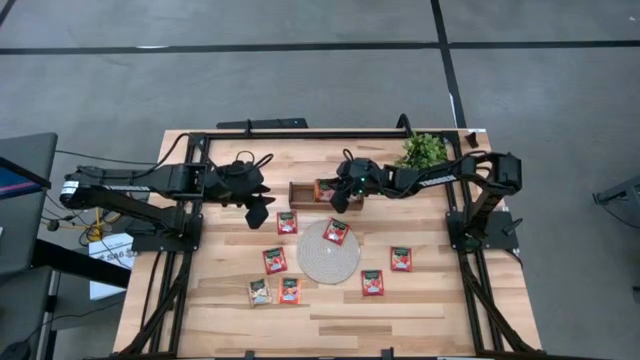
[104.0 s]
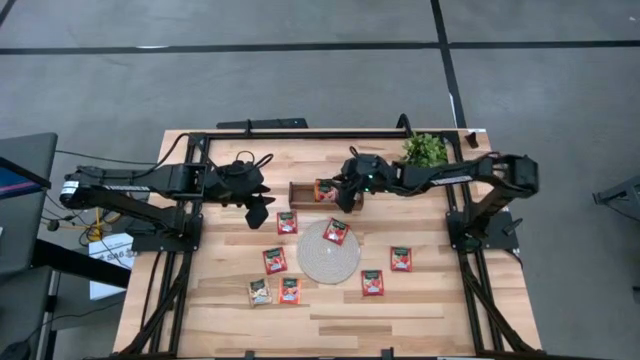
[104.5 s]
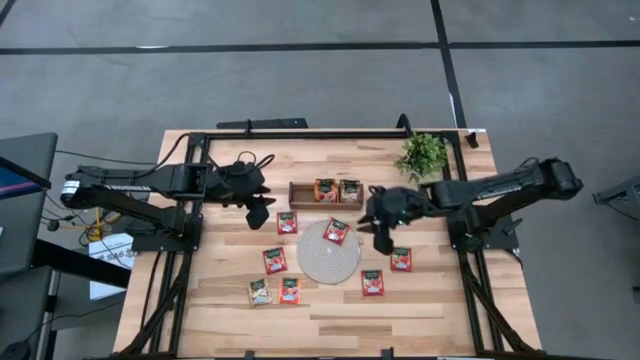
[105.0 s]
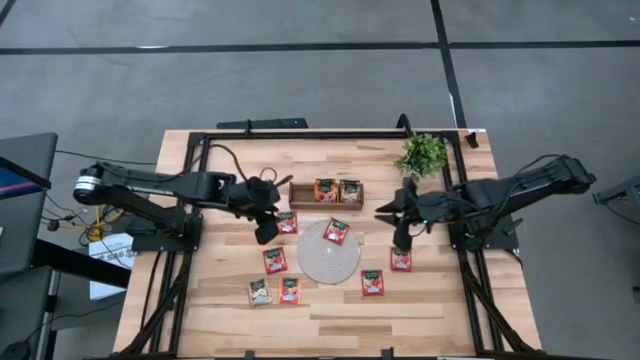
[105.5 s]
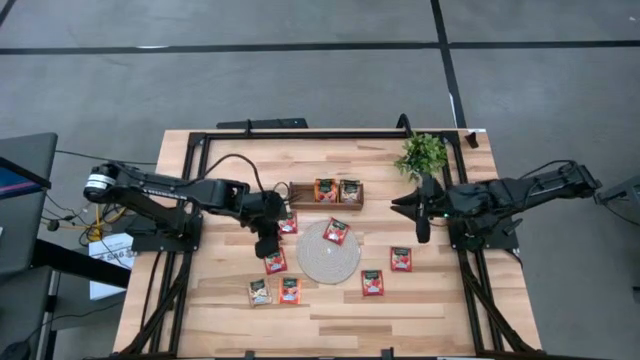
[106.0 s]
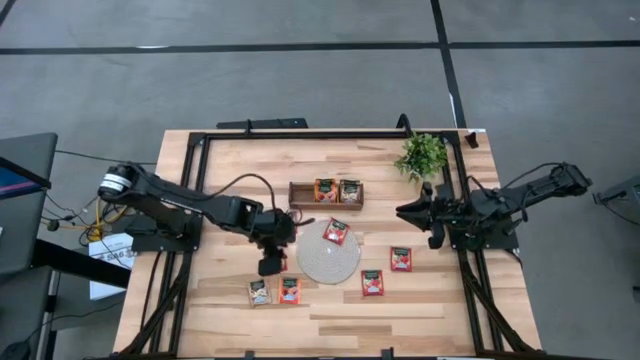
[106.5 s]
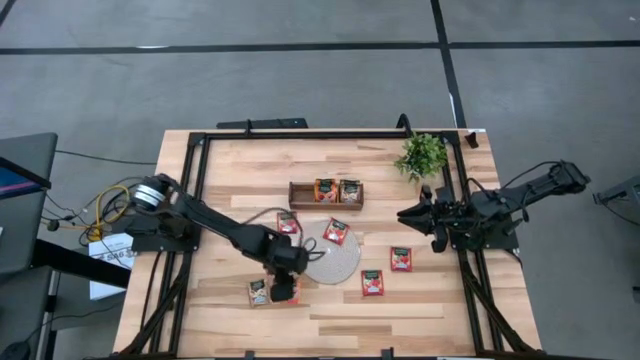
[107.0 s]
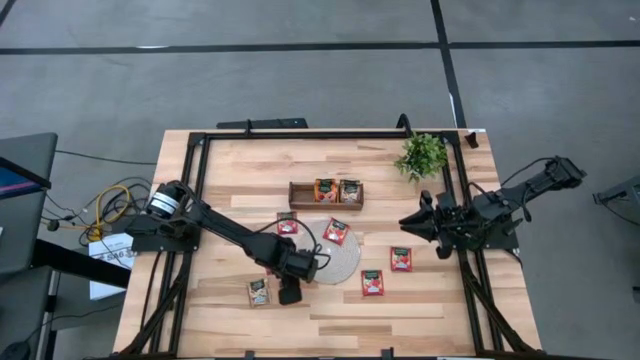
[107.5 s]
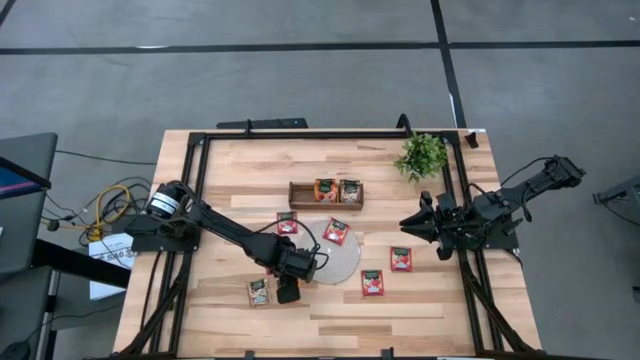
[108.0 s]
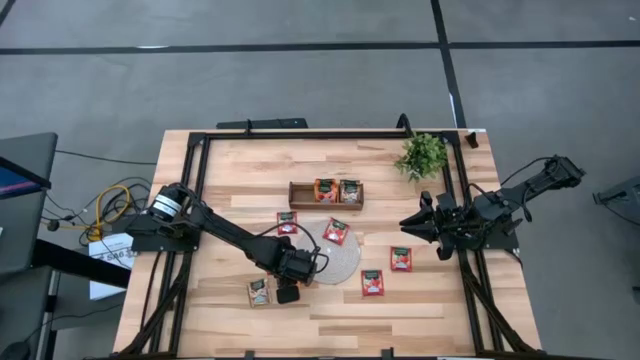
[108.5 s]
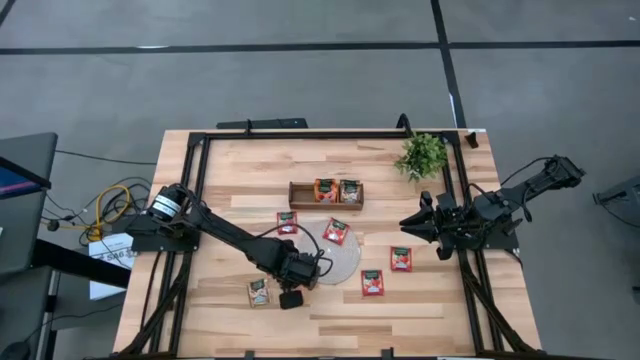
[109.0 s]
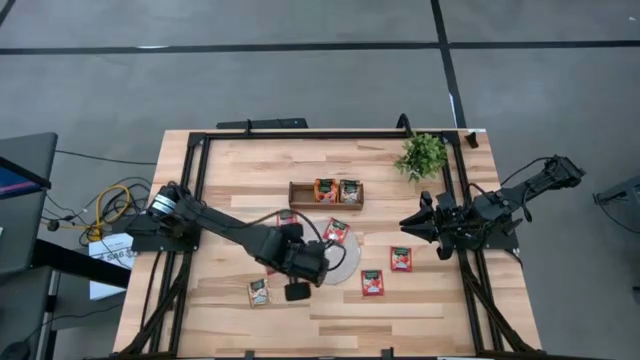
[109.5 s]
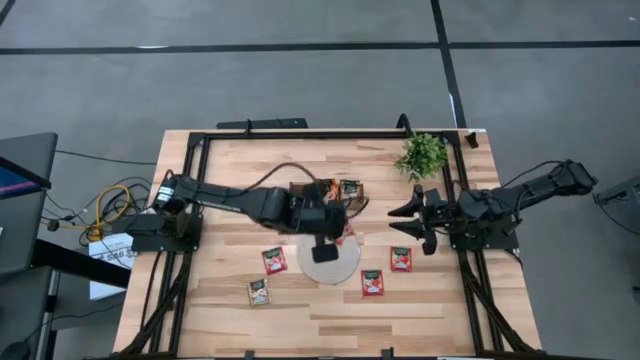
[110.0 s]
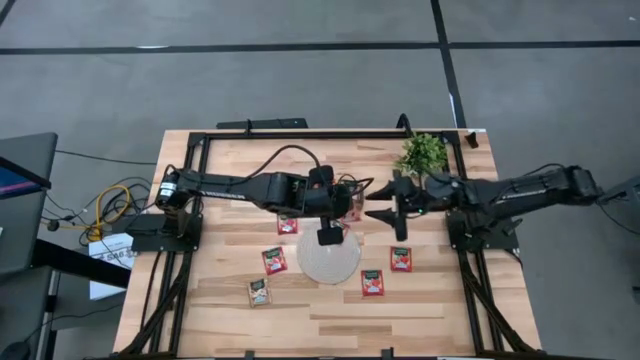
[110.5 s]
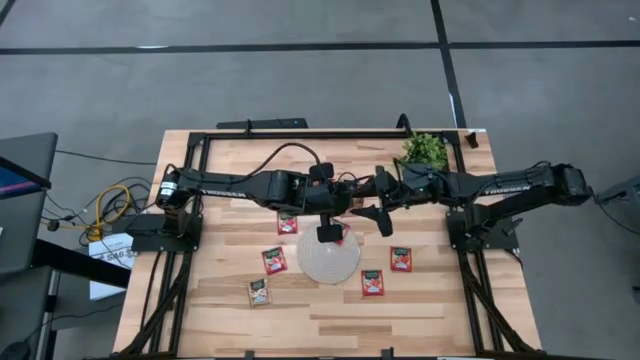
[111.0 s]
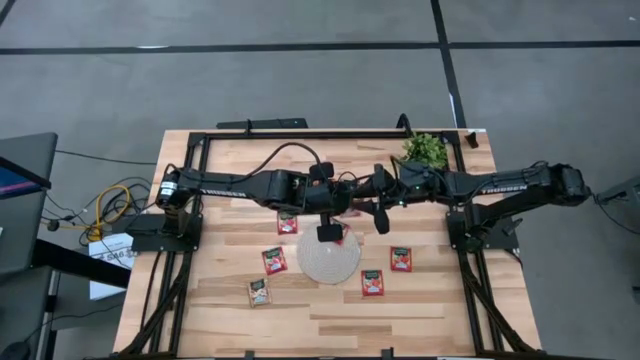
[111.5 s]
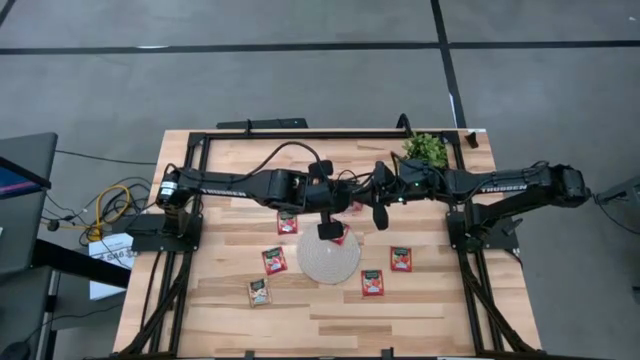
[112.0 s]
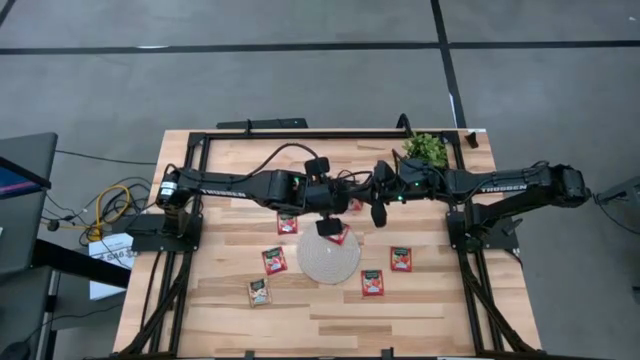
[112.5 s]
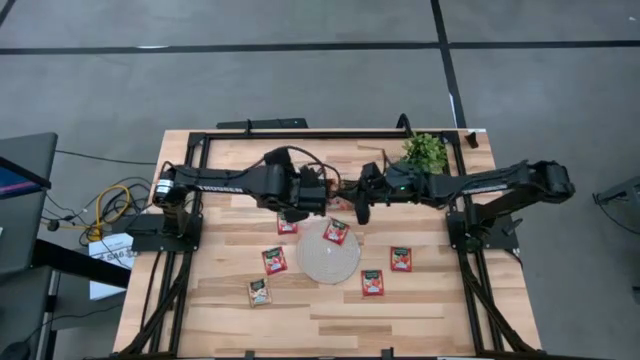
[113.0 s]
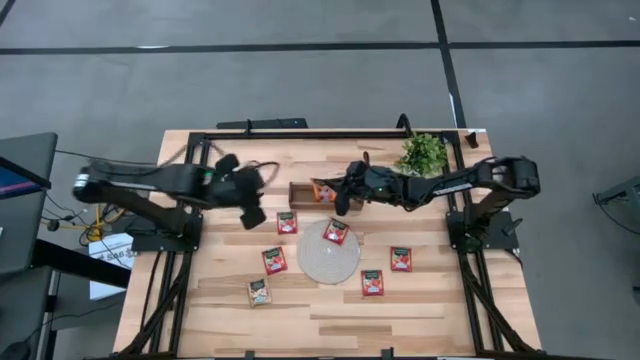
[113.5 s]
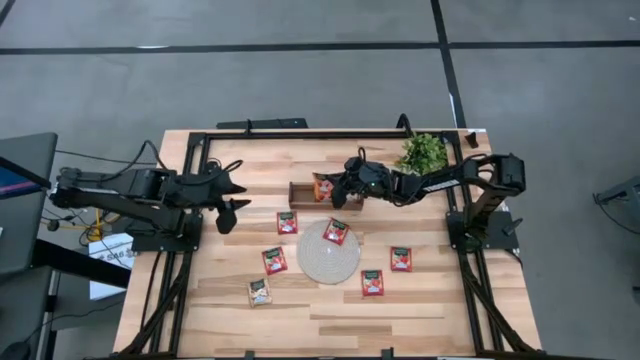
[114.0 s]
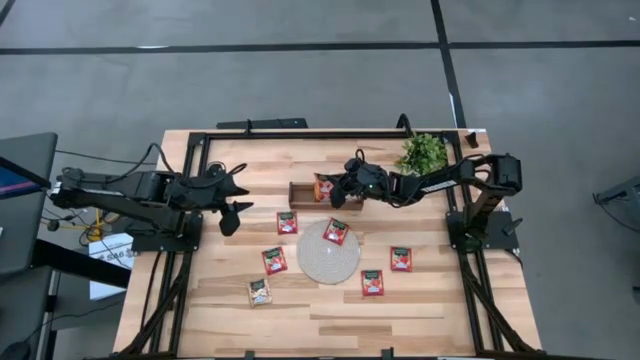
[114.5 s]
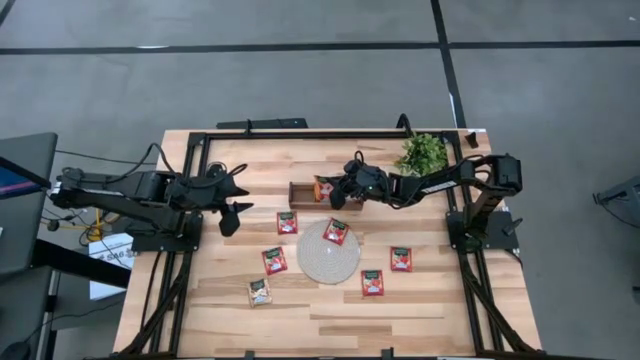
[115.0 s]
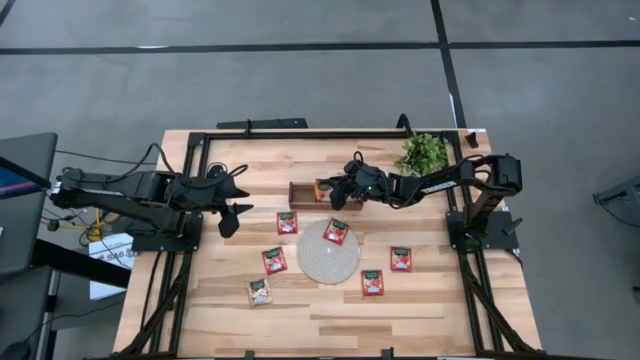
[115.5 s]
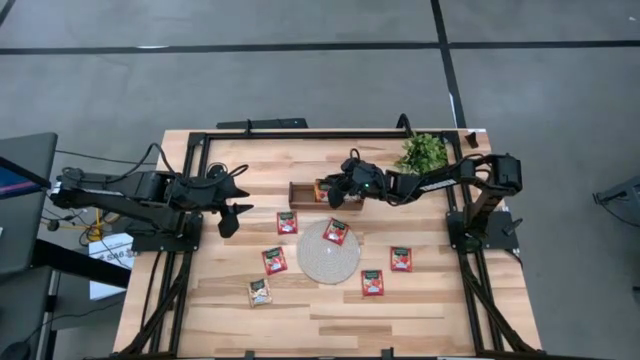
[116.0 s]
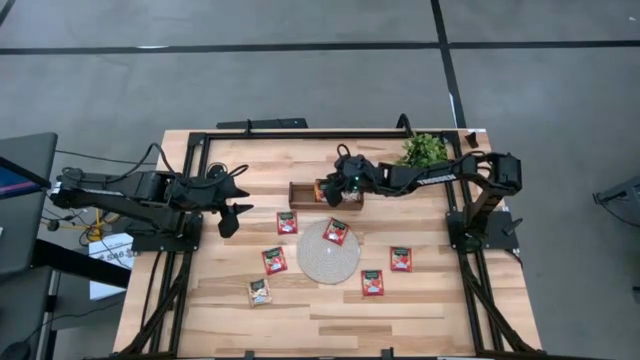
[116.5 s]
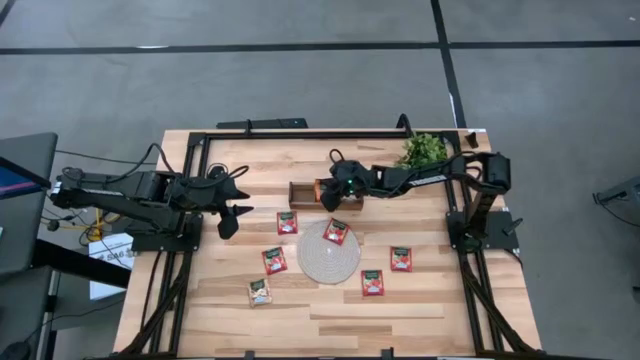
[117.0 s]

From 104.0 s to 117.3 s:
Task: Pick & Place Tea
Put the orange tea bag into the middle section of the wooden organizer

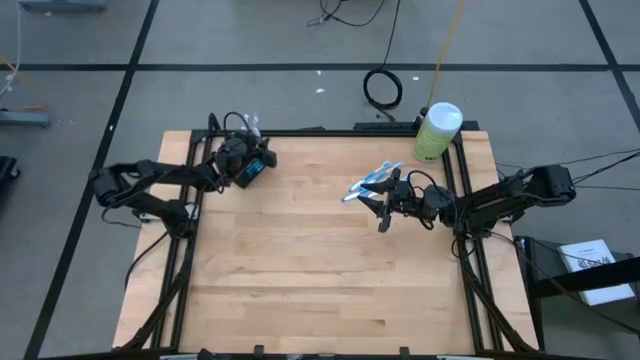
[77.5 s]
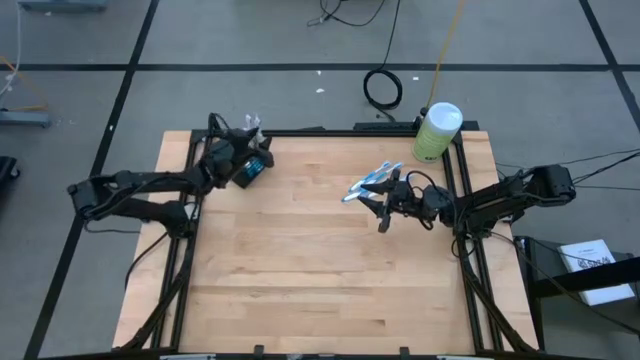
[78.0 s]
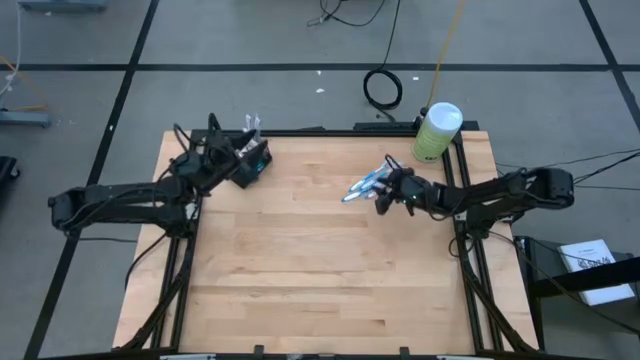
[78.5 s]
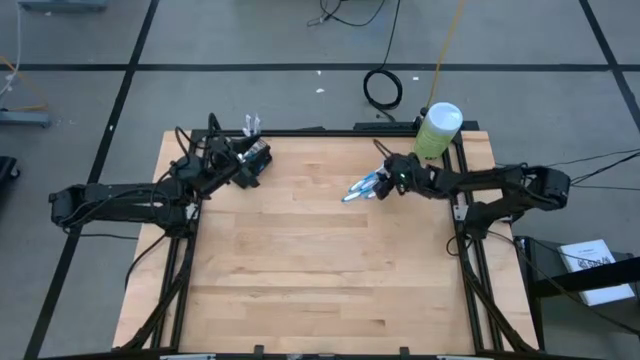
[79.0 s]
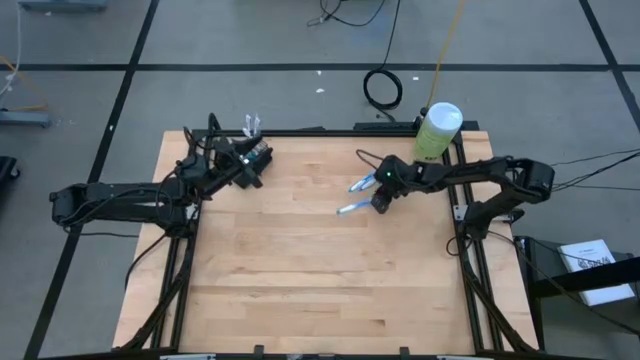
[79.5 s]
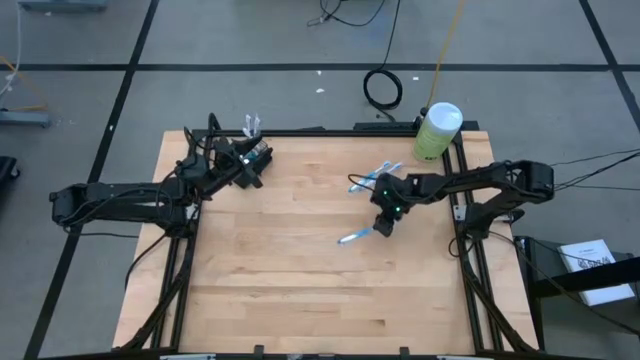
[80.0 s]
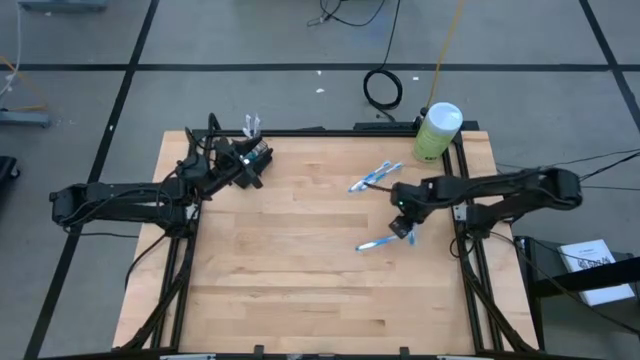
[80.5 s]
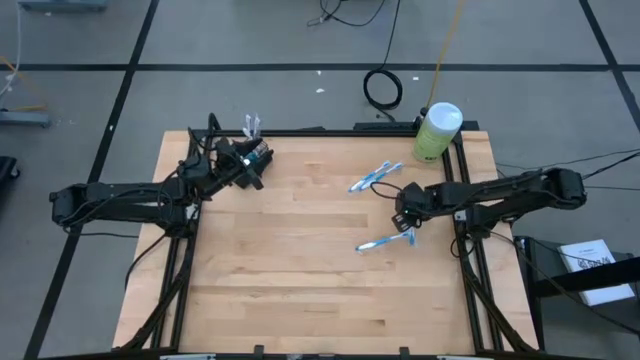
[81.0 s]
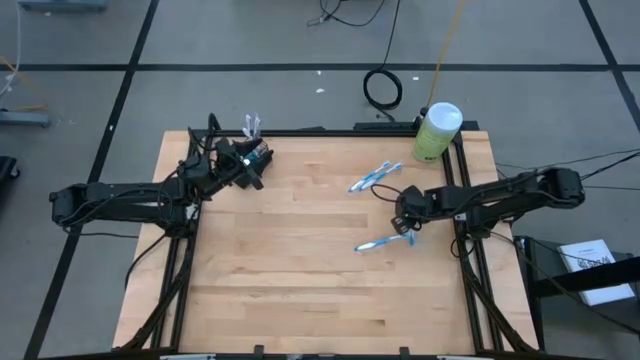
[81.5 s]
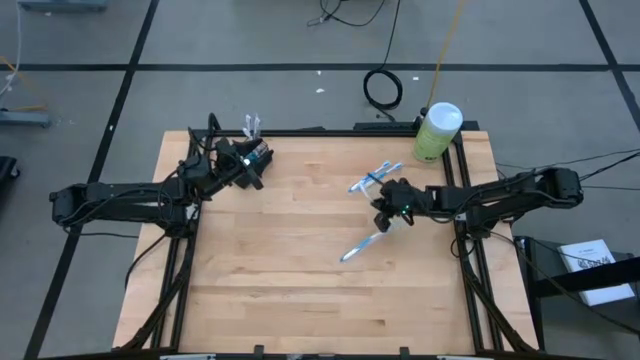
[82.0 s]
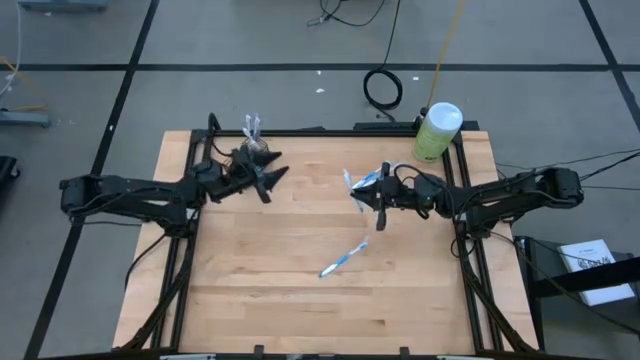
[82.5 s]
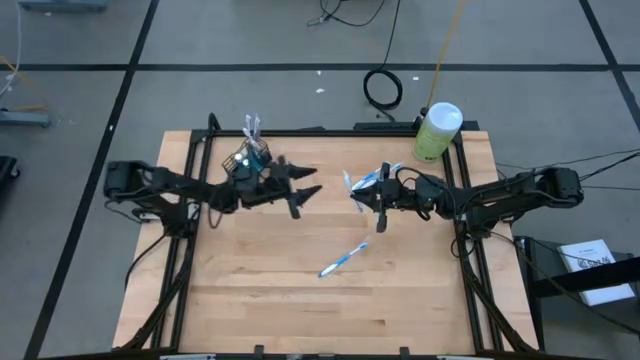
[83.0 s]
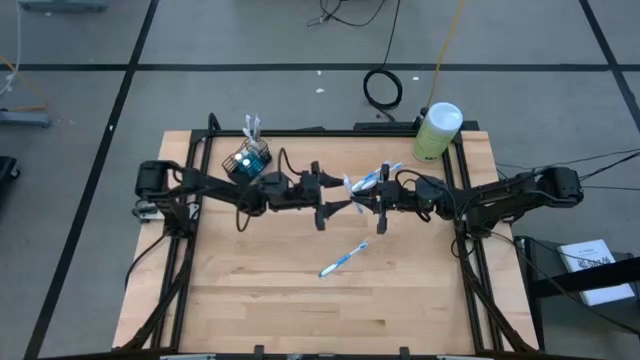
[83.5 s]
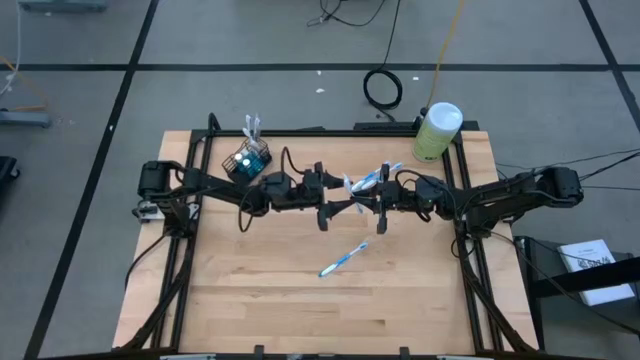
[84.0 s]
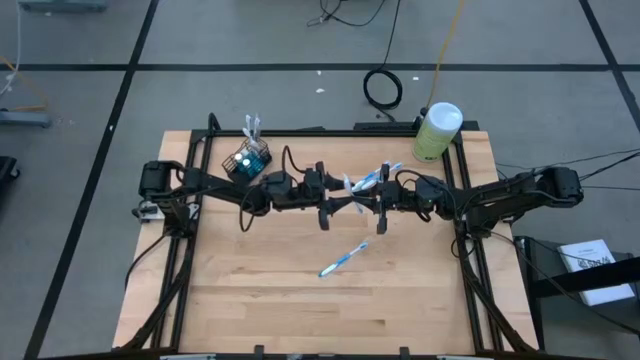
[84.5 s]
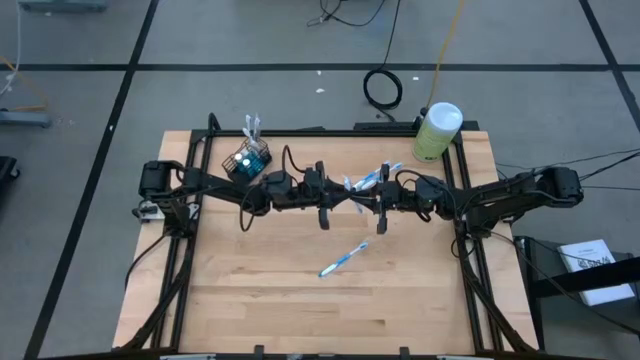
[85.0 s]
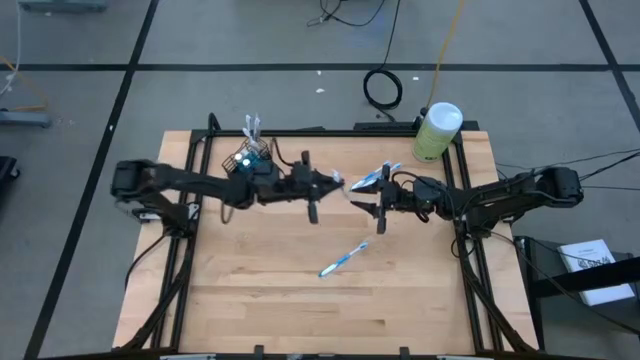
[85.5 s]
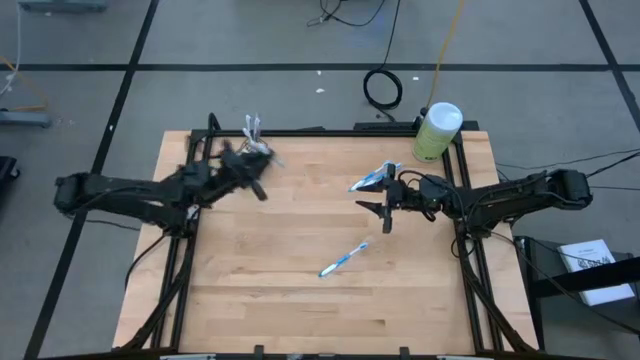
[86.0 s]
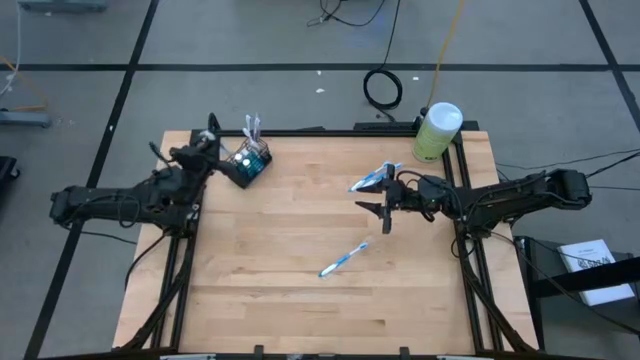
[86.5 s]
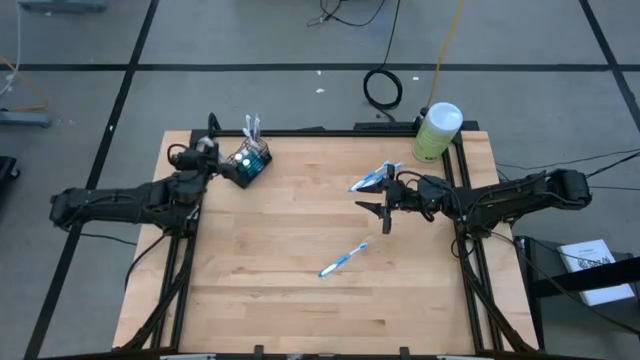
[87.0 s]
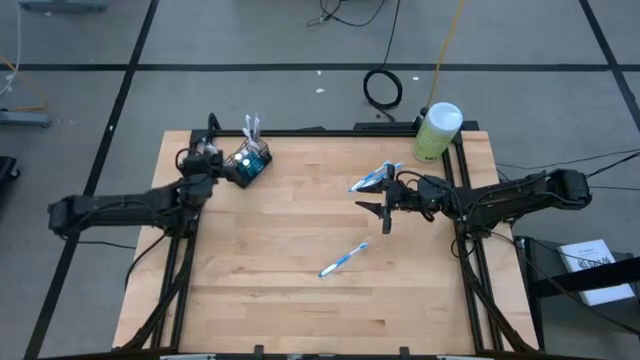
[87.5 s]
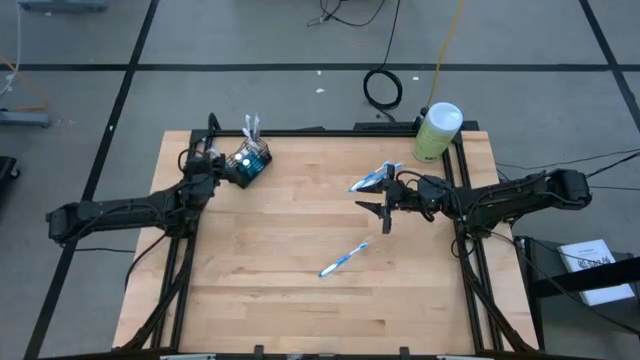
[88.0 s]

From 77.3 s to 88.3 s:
Task: Pick & Place toothbrushing station
Put the blue toothbrush into the left compartment of the wire organizer
